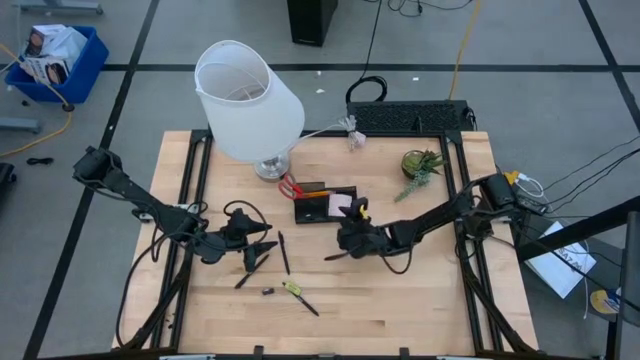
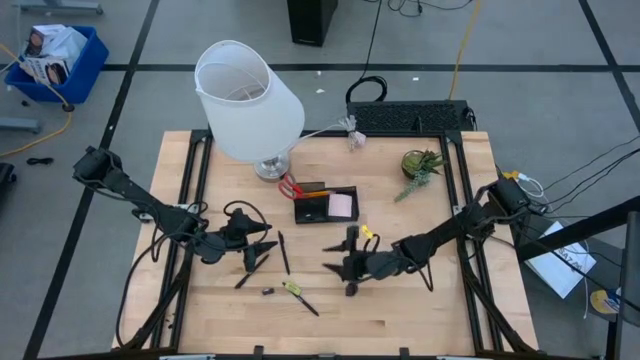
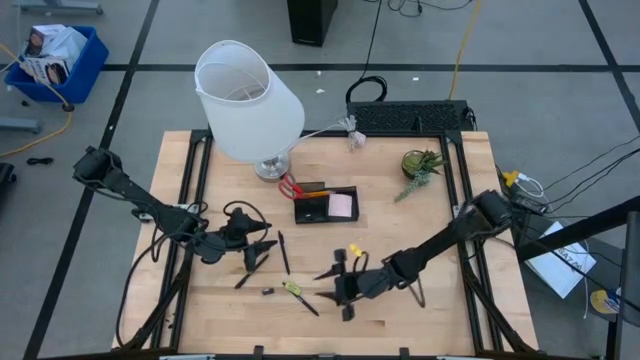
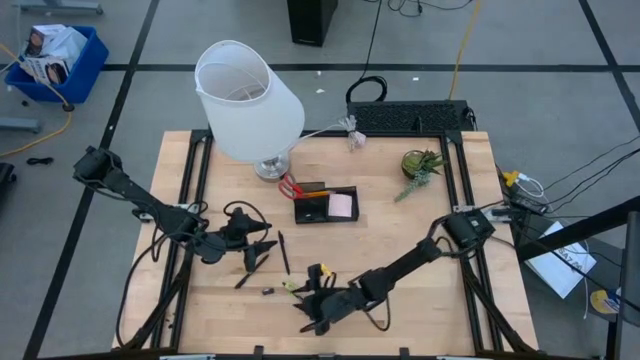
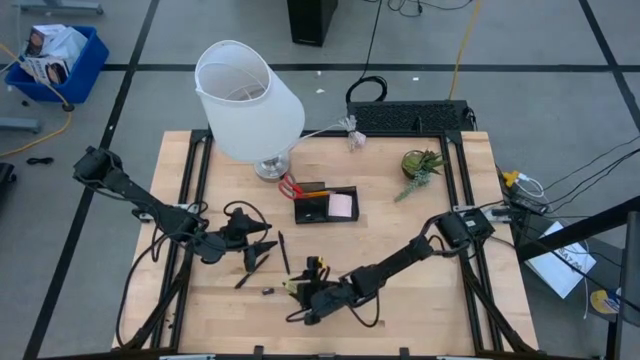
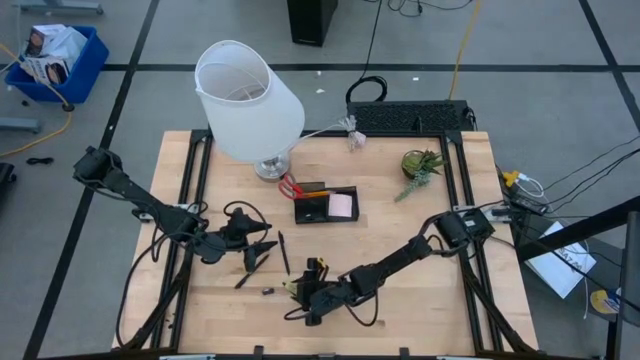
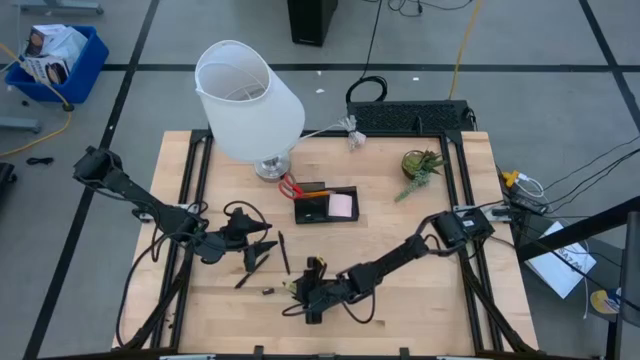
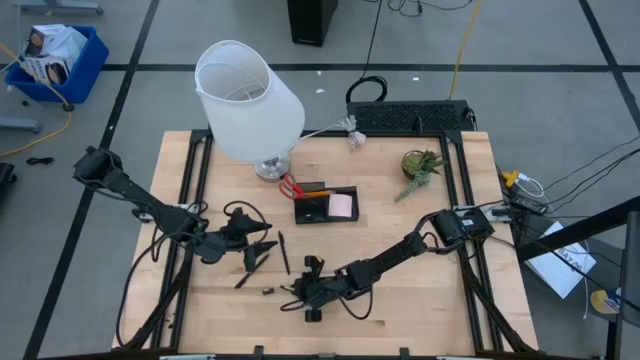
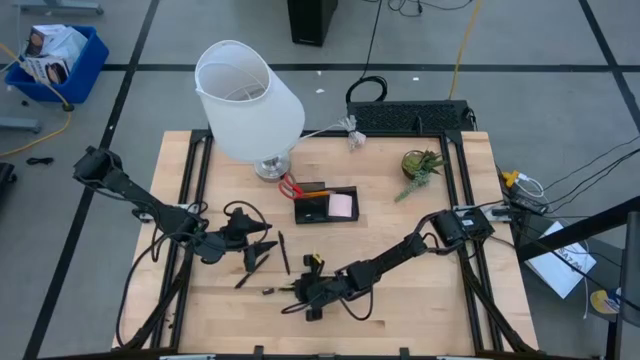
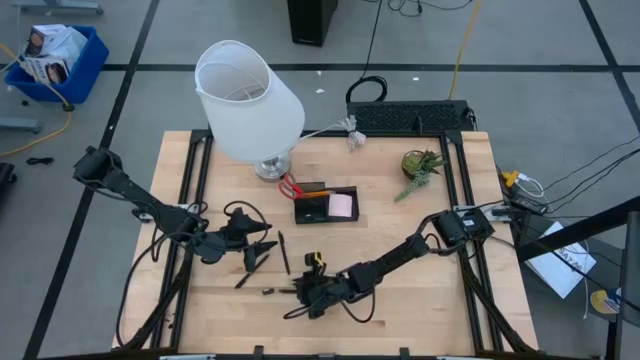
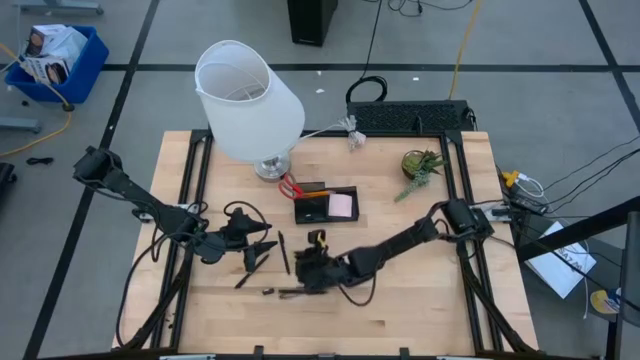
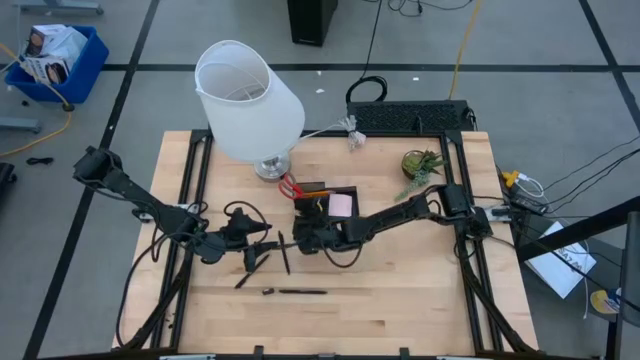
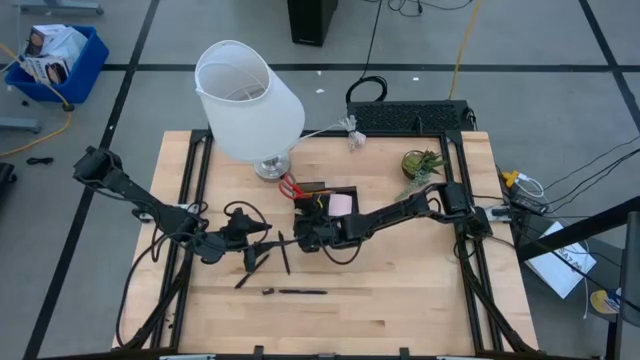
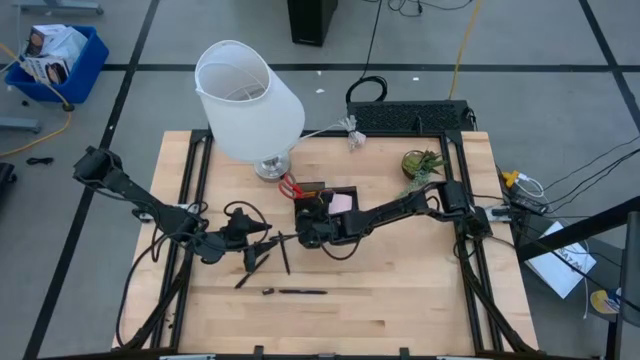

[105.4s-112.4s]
Task: Pick and place office supplies into organizer
Put the yellow eraser into the bottom left compartment of the desk organizer

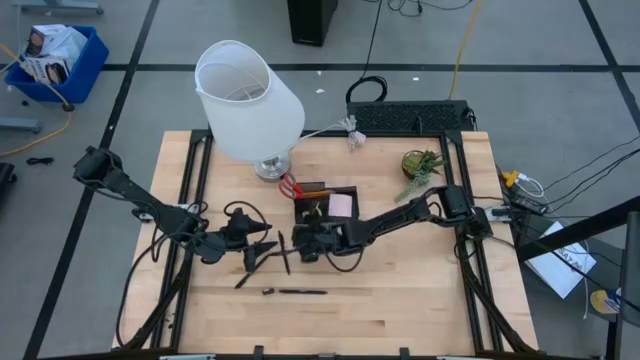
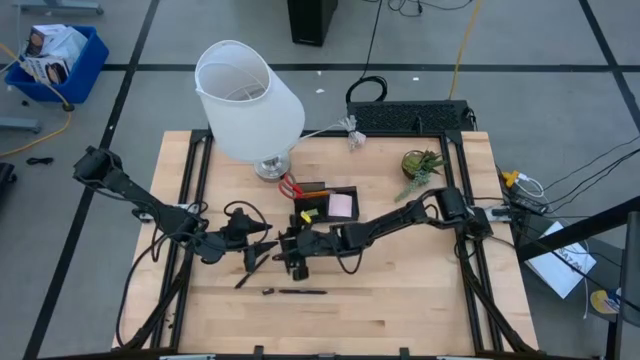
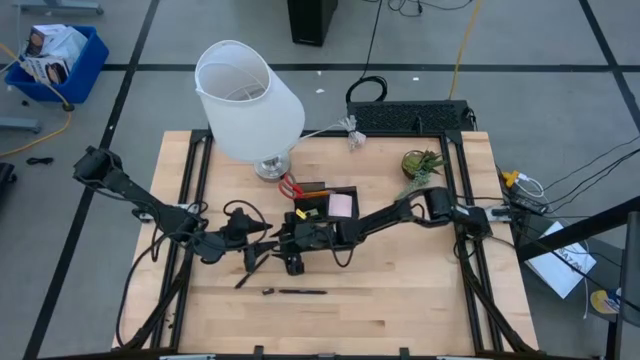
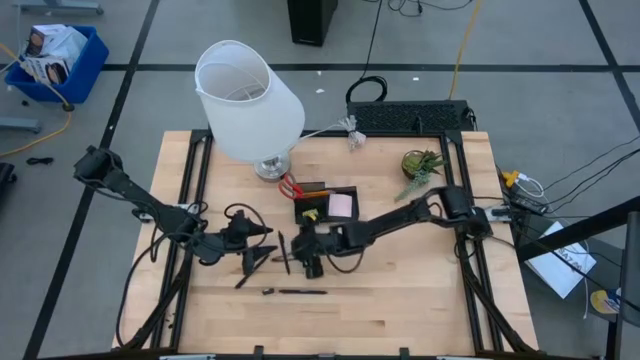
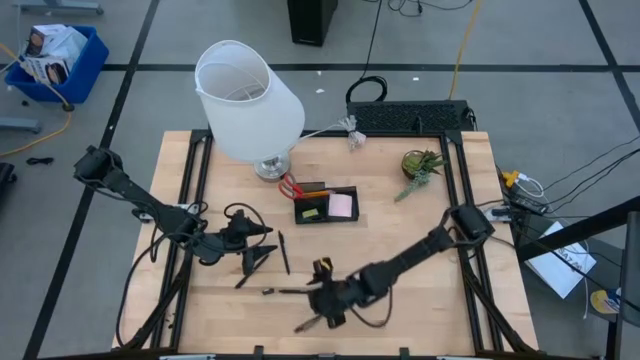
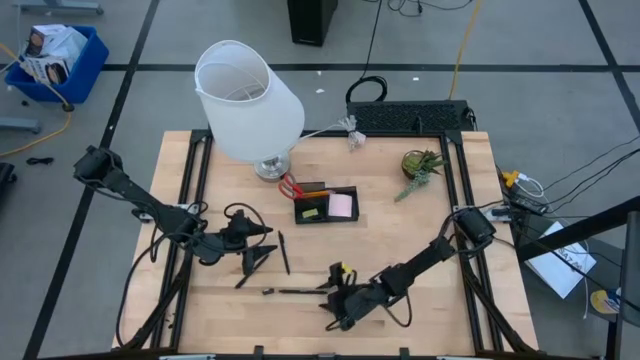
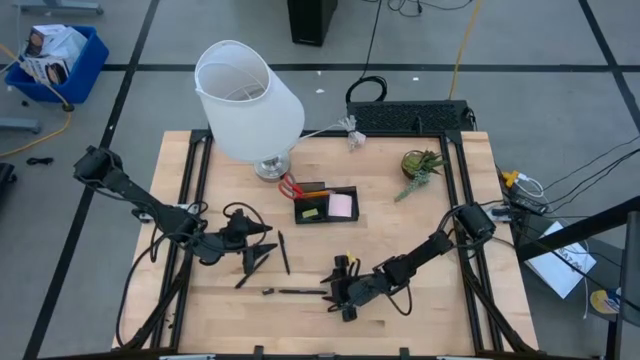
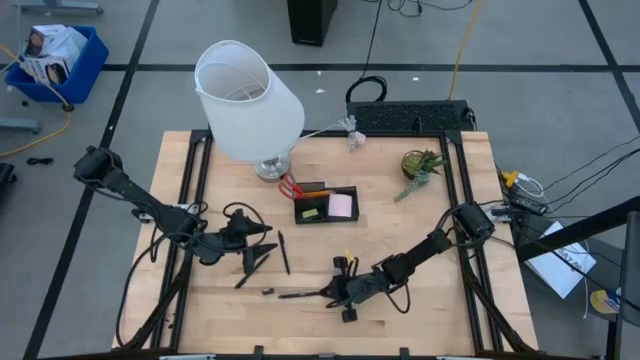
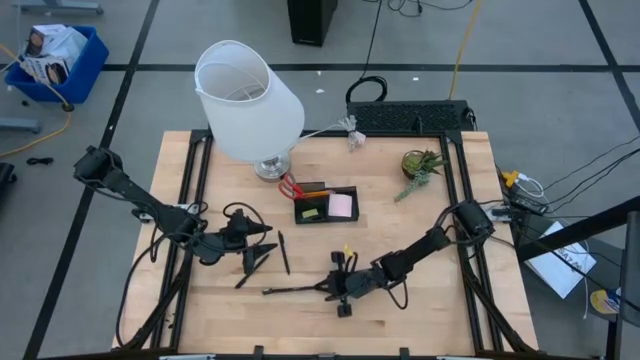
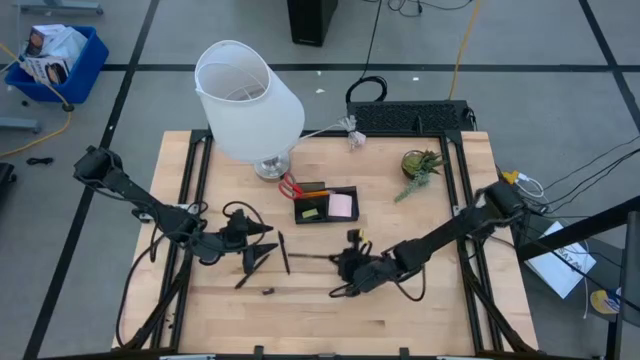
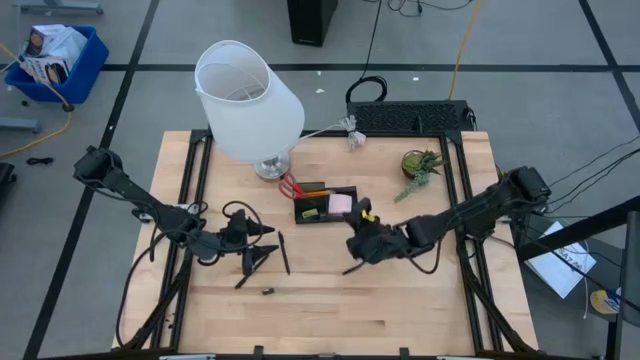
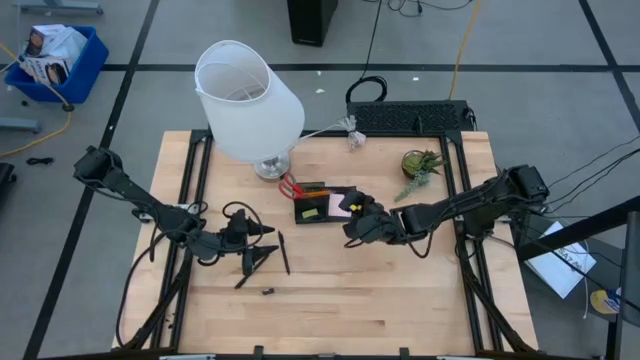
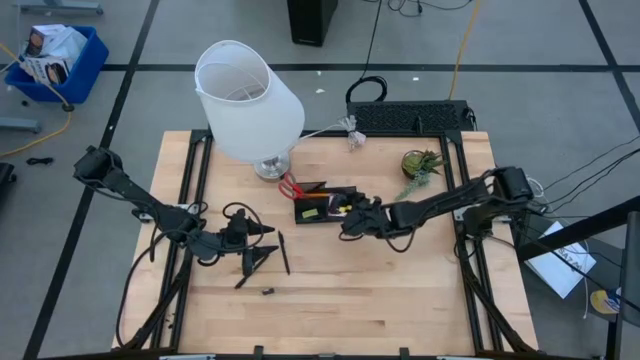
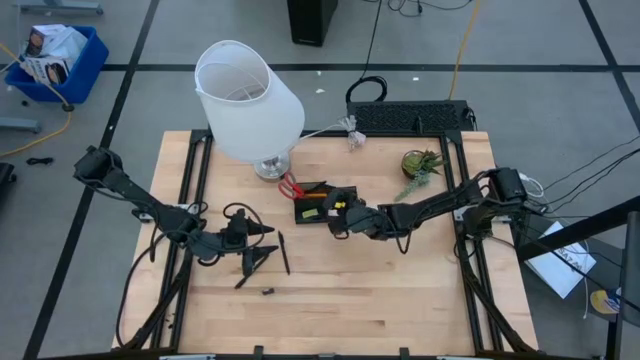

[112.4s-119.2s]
Put the bottom right black pen into the top left compartment of the desk organizer

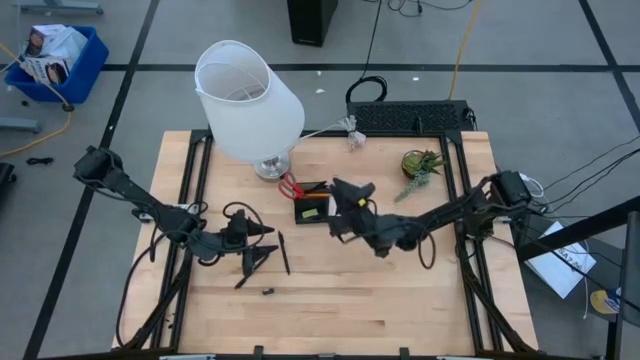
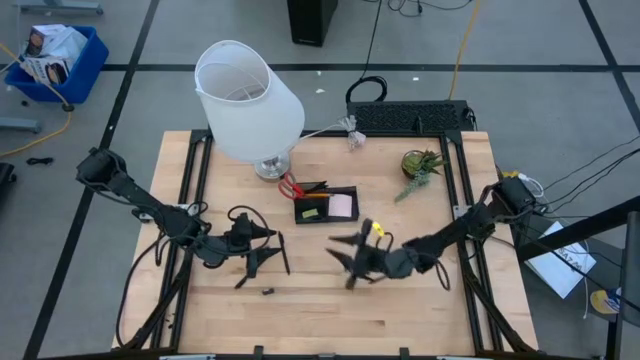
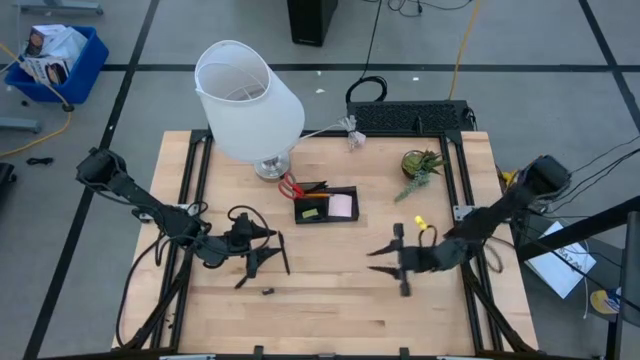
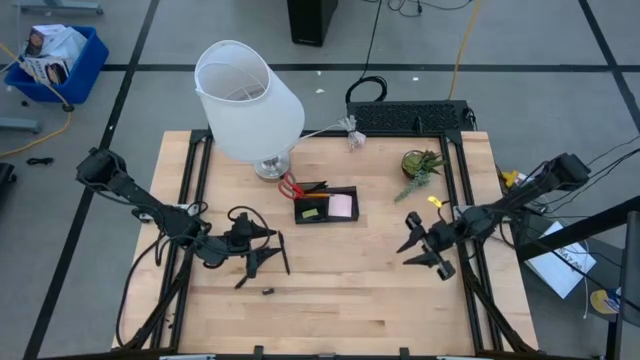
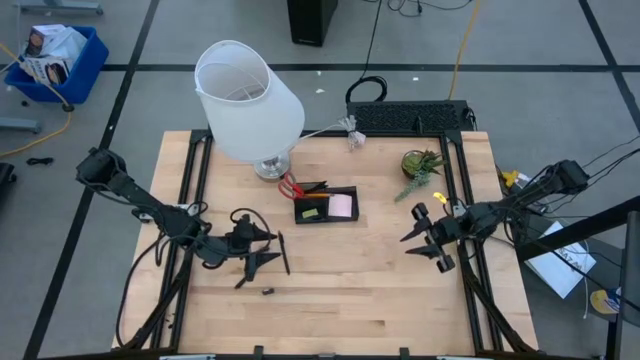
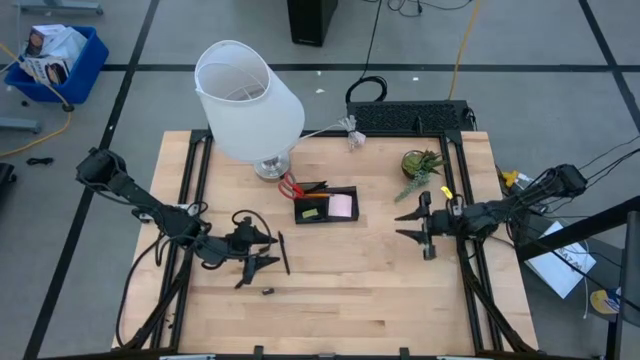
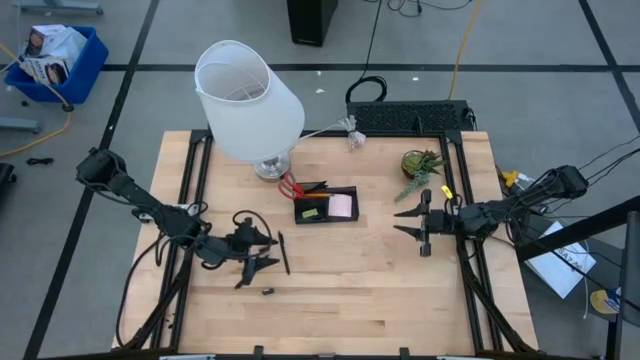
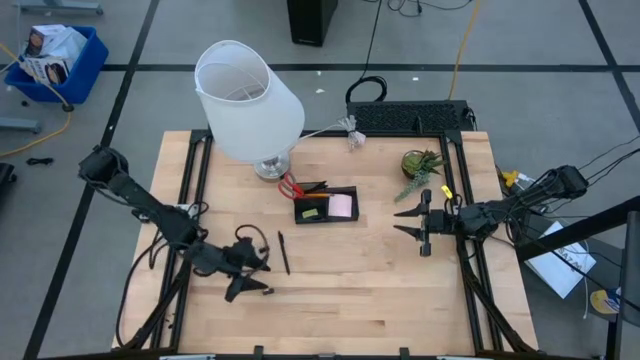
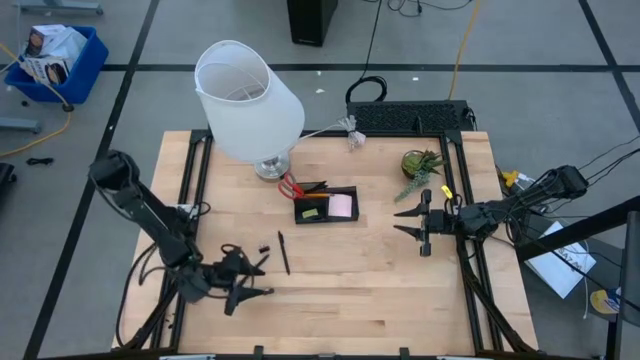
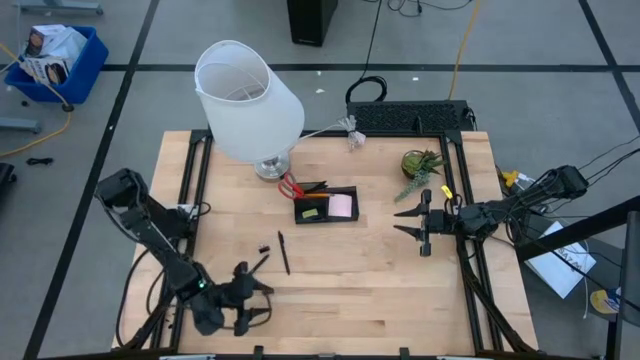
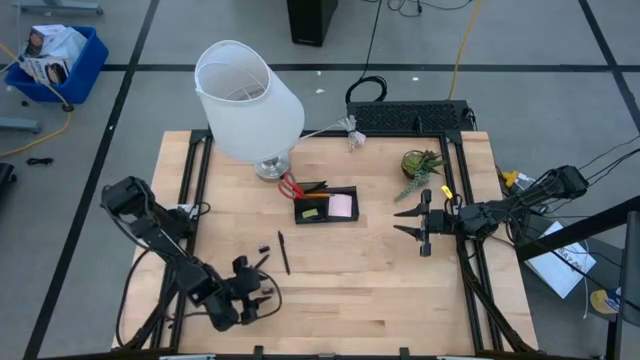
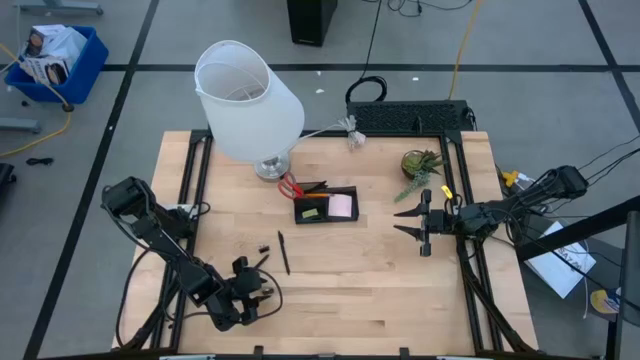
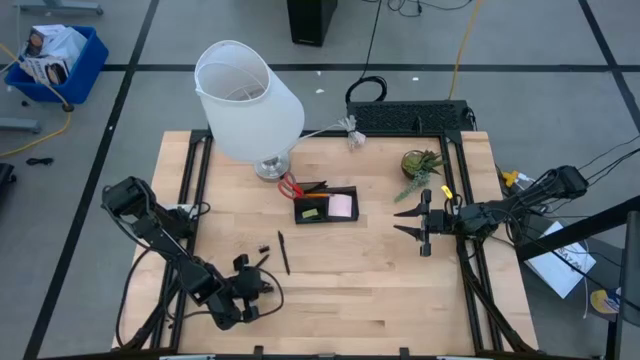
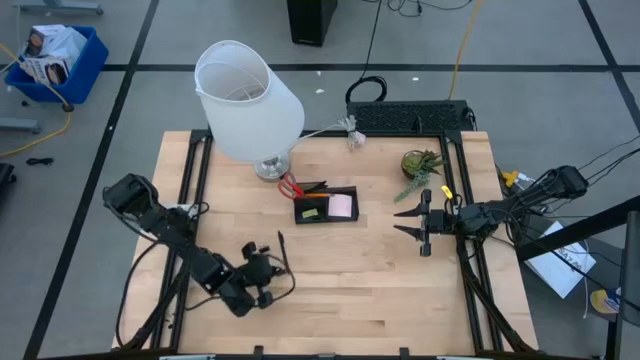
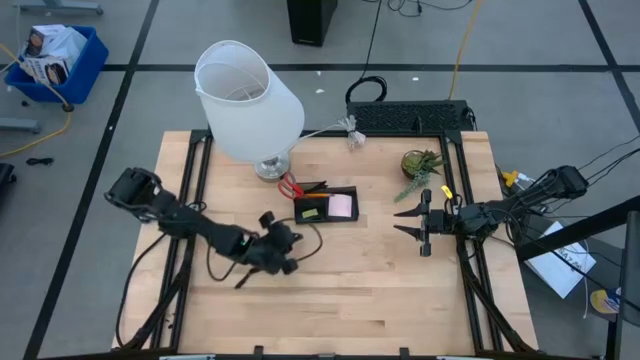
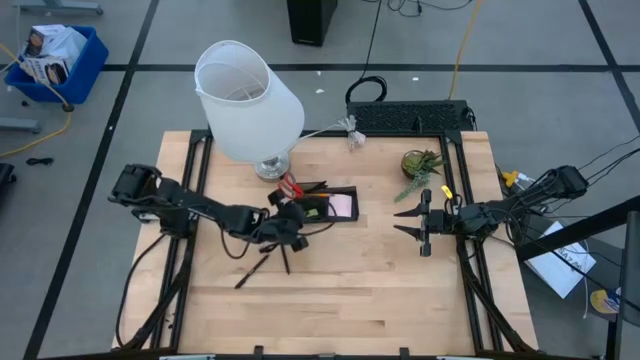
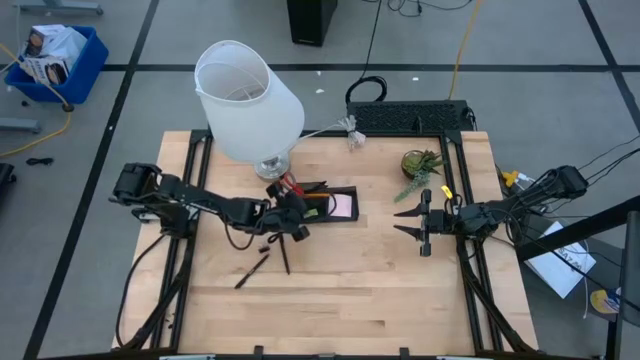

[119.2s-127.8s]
Put the bottom black binder clip into the bottom left compartment of the desk organizer
